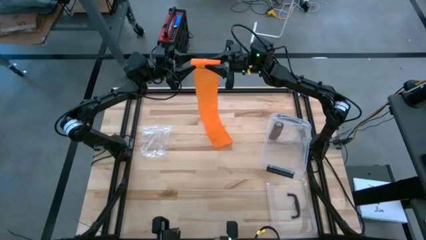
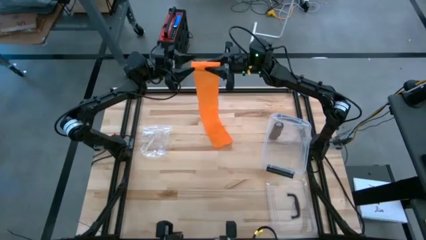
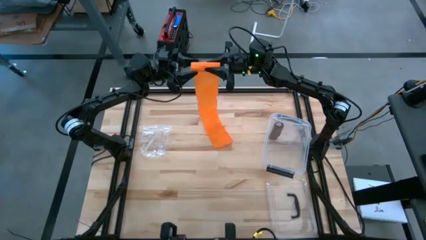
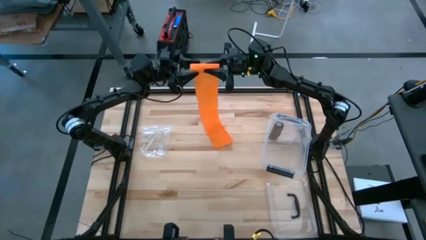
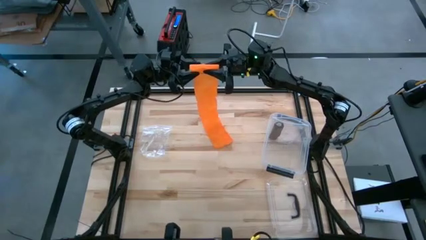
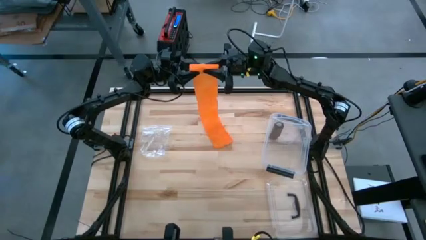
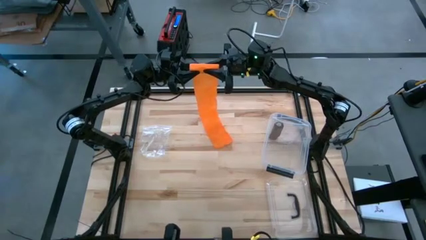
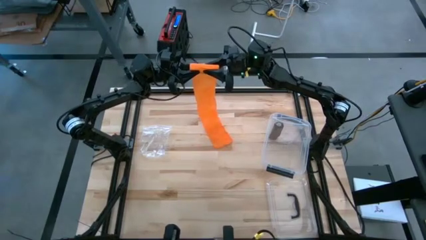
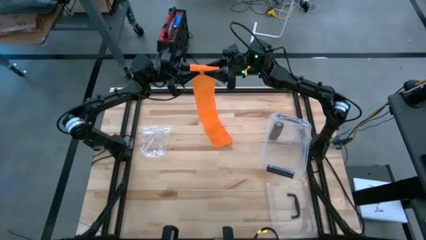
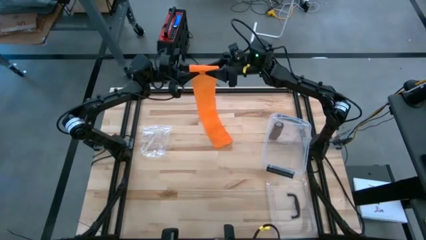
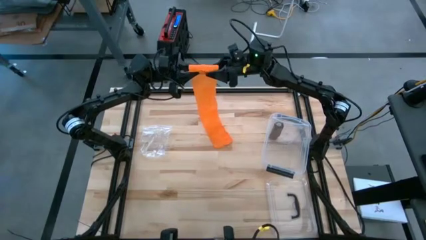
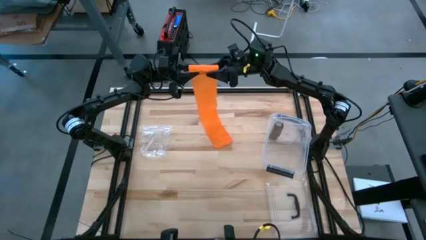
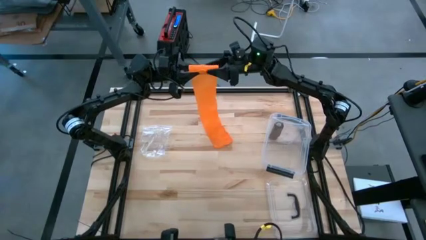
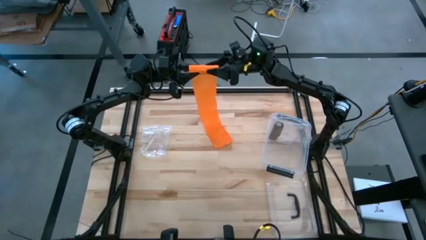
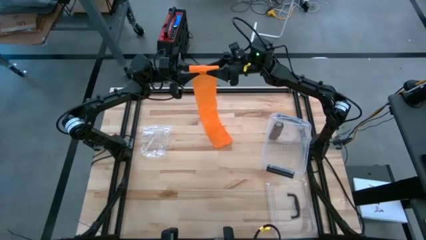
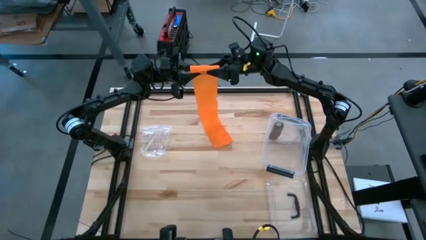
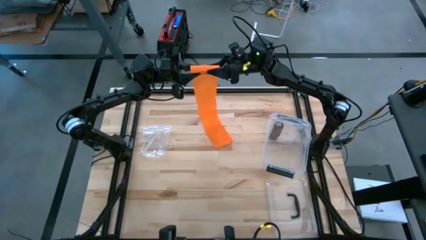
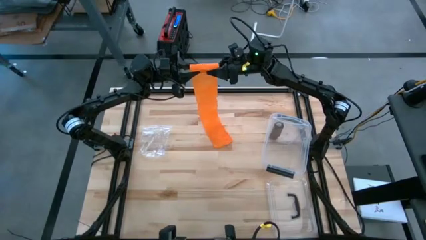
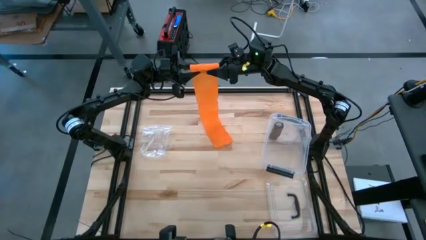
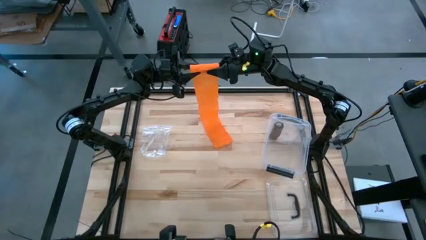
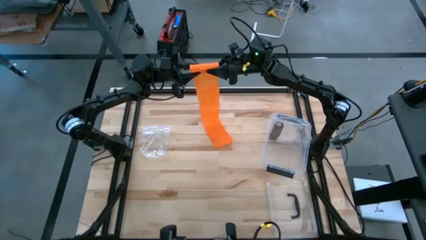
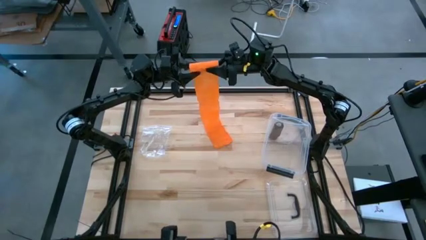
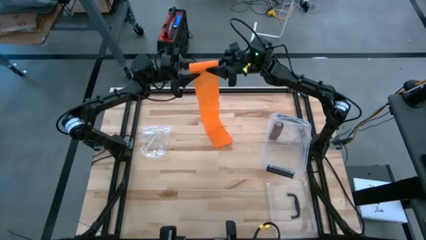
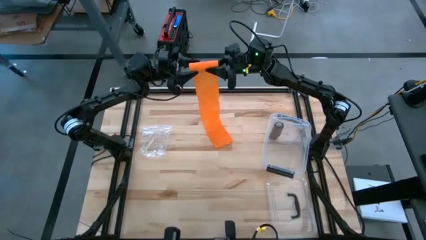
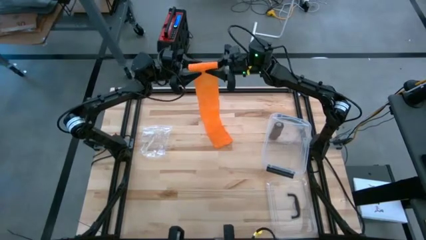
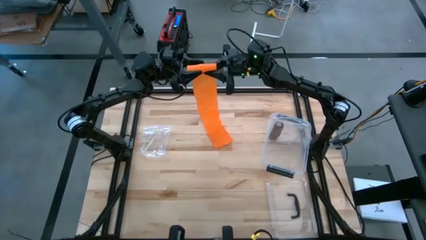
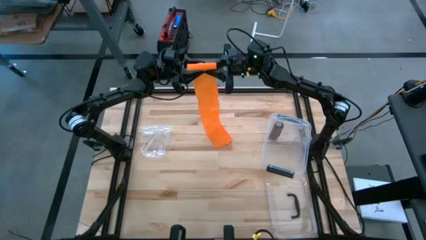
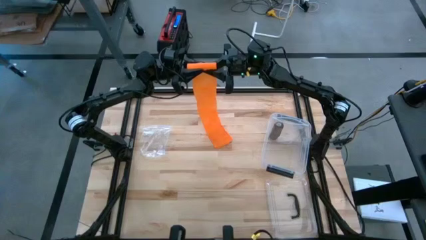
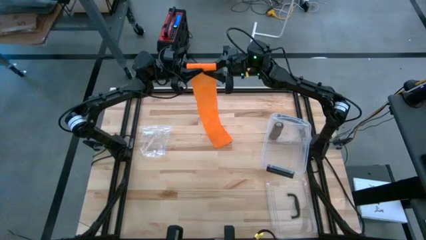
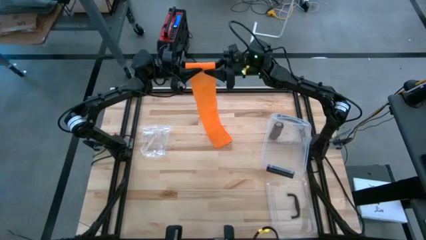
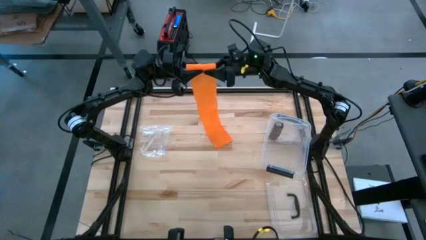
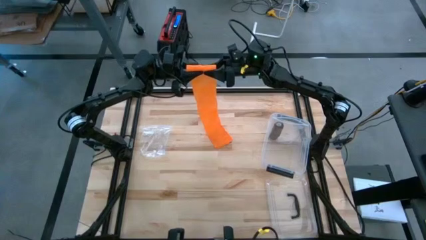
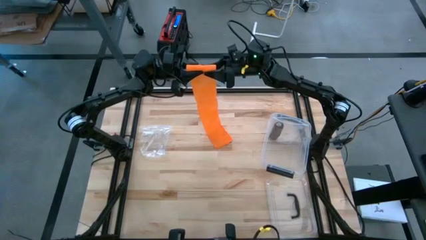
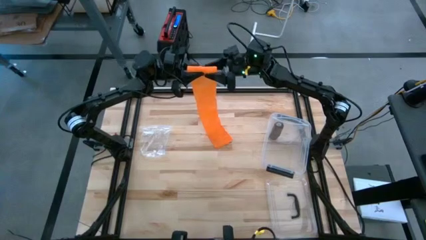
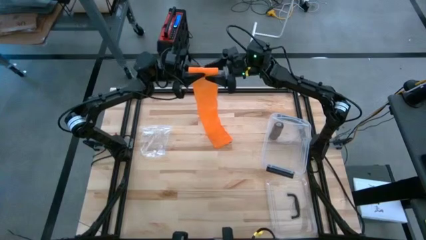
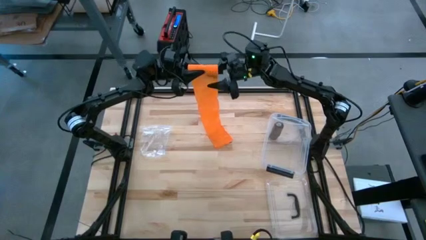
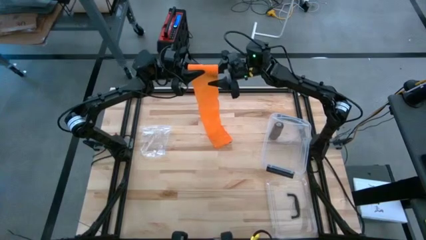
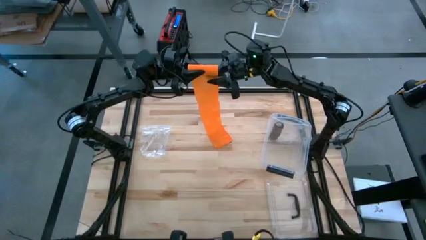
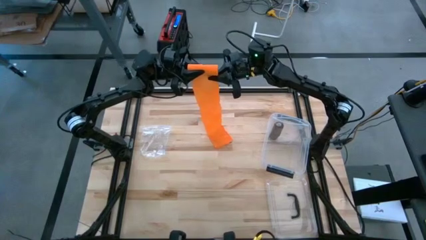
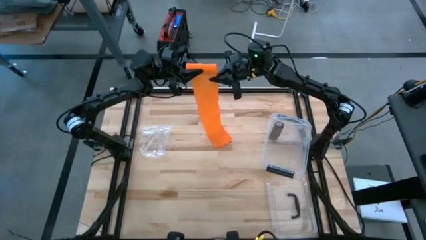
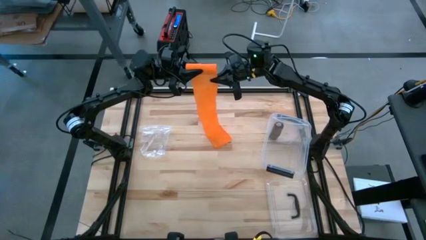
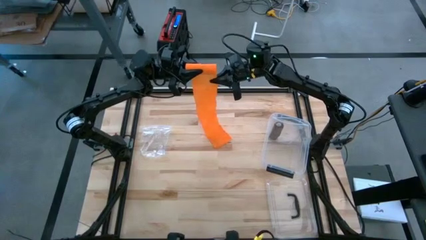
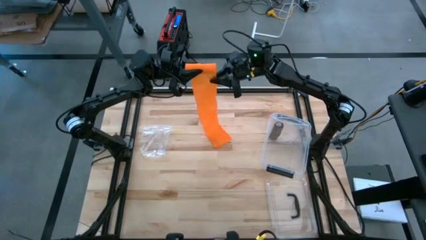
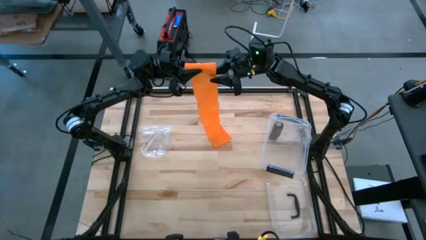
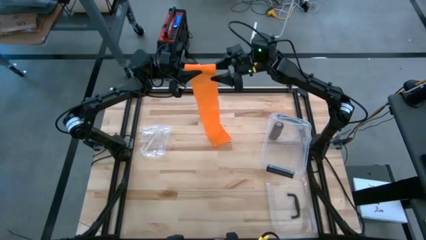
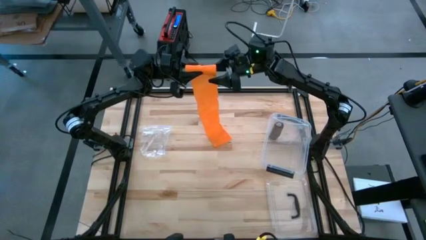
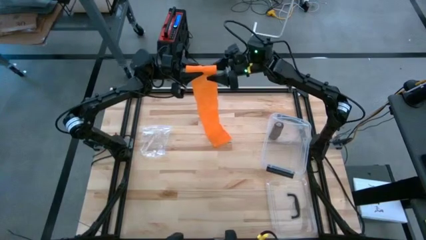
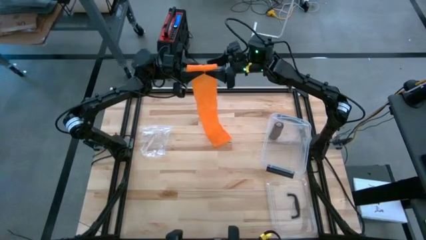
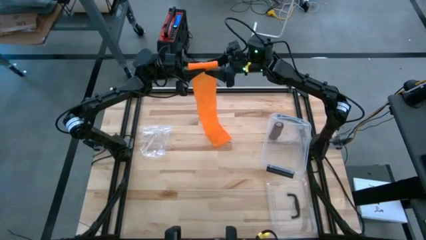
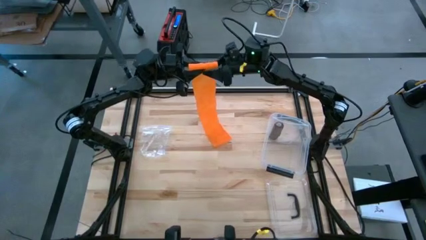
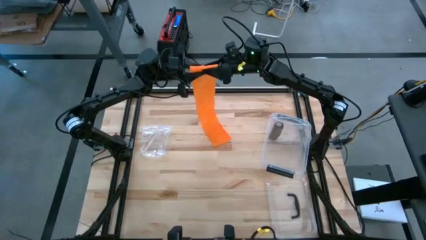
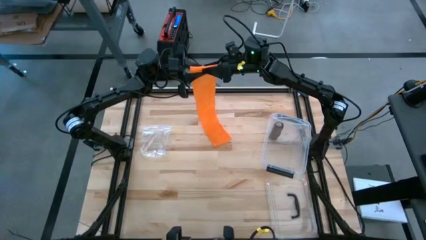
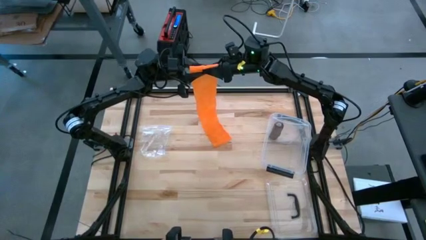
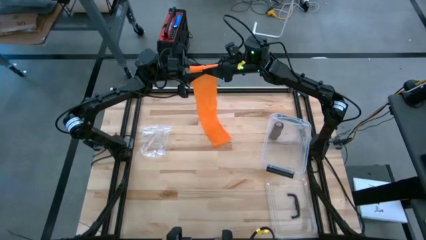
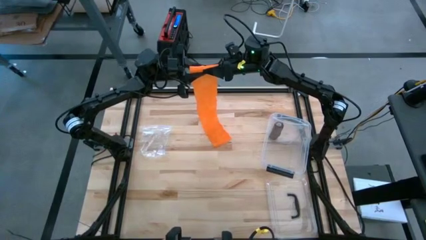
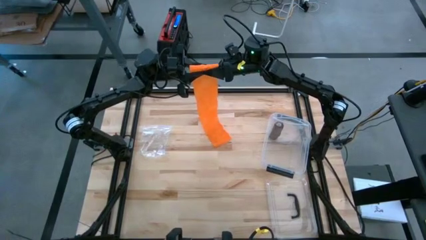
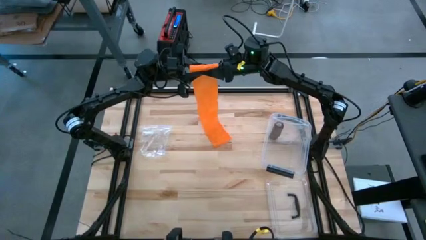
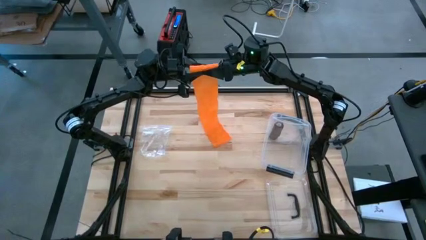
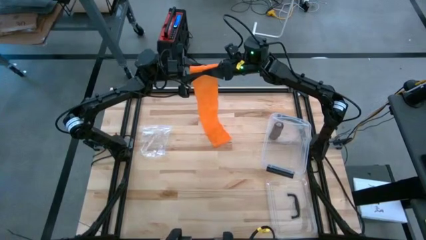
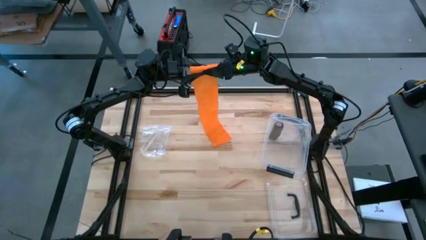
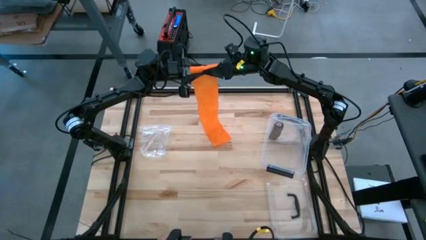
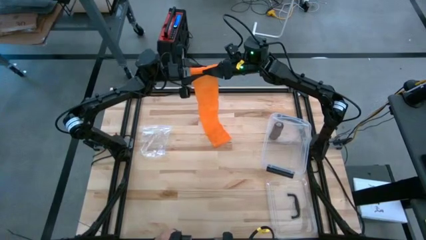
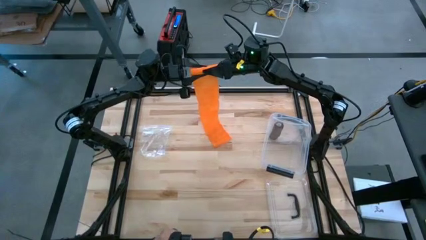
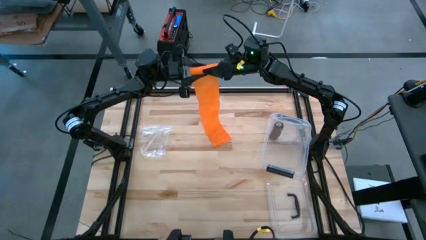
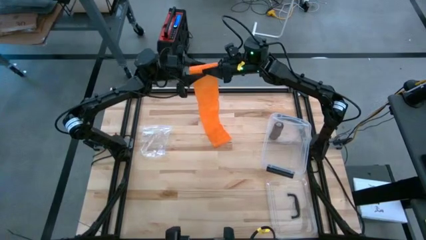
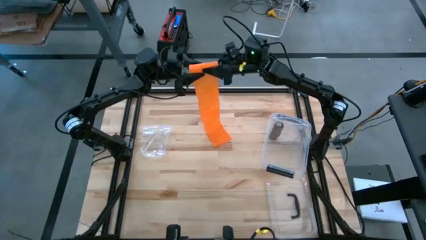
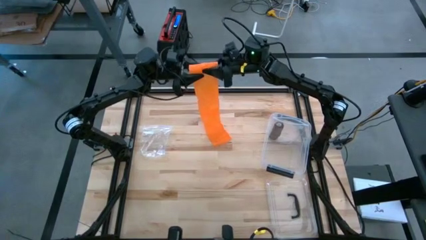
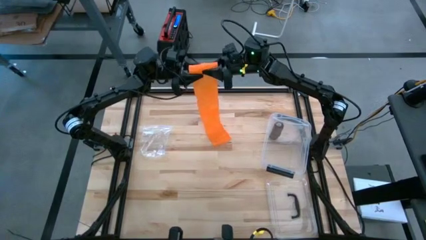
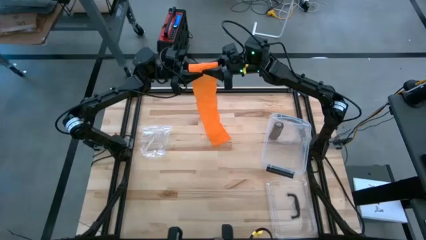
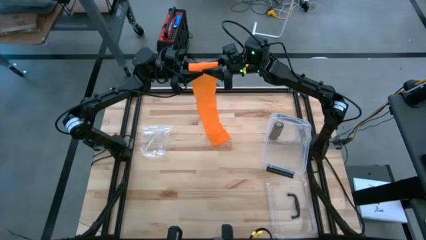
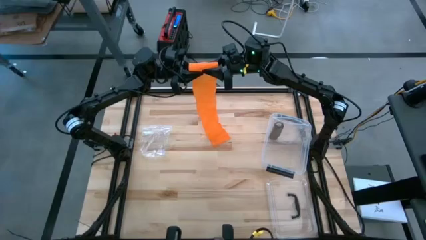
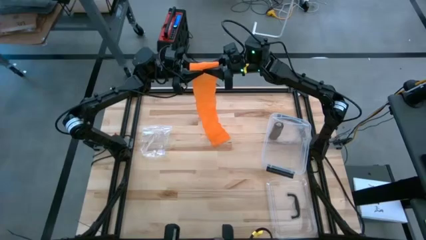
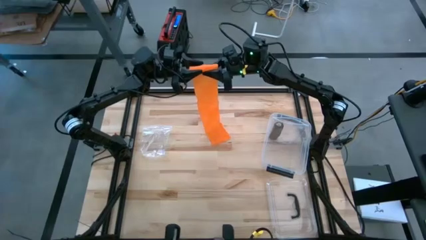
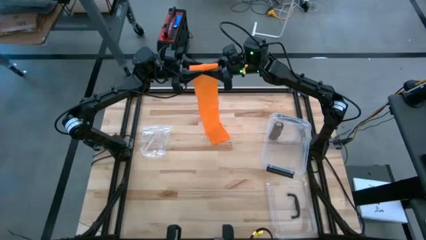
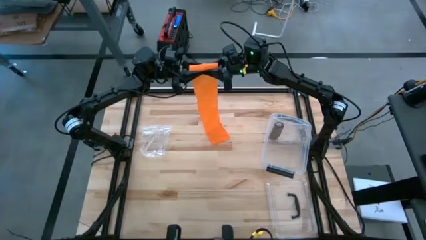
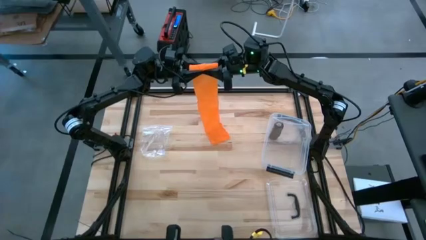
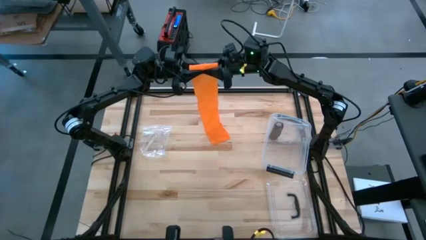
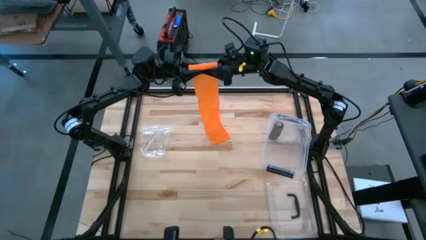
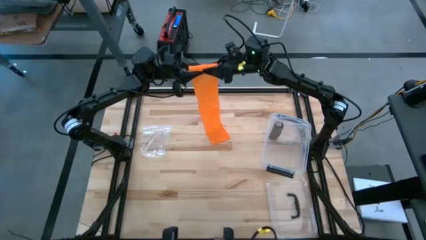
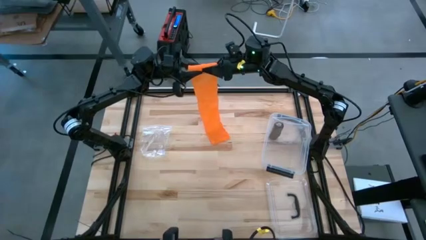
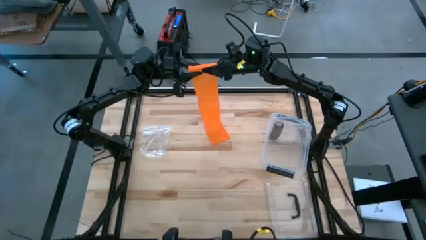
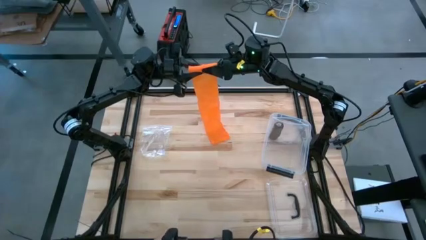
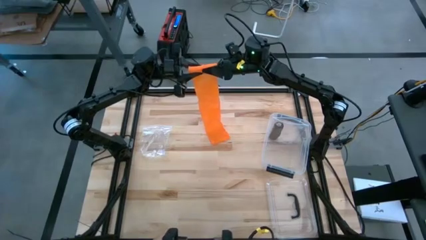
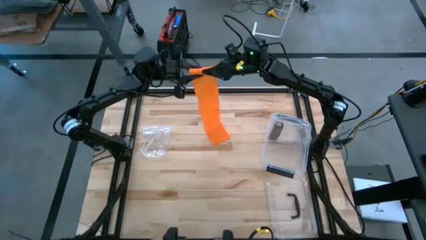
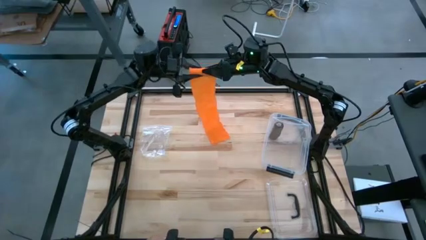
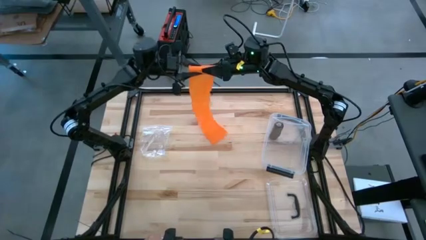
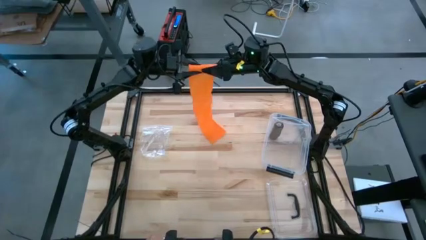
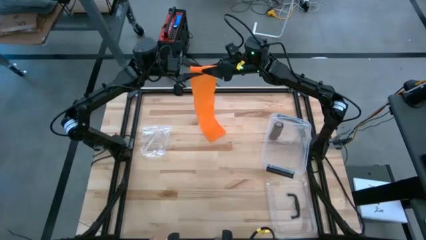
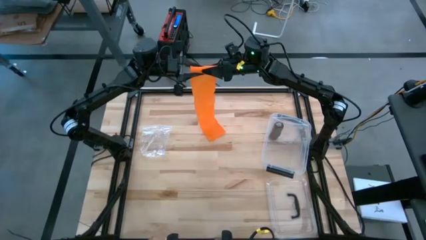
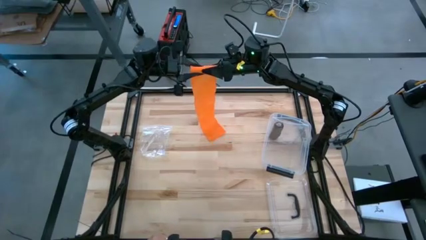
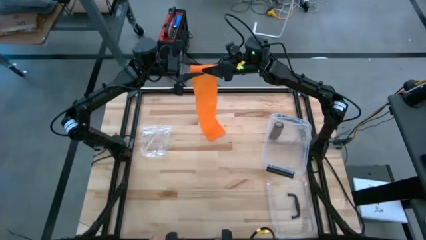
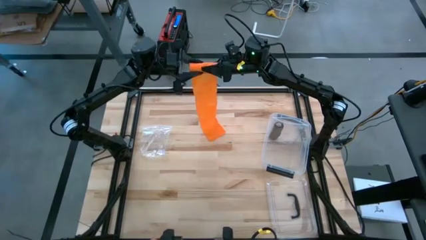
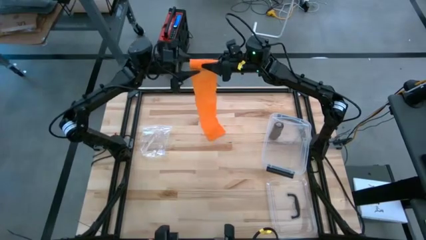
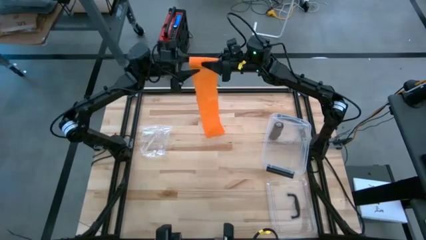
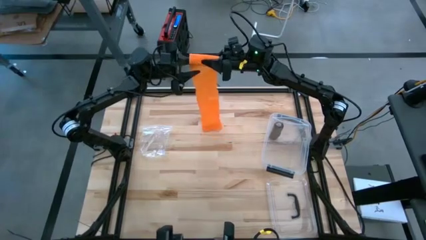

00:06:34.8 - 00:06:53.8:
Task: Roll bandage
Roll the orange bandage
